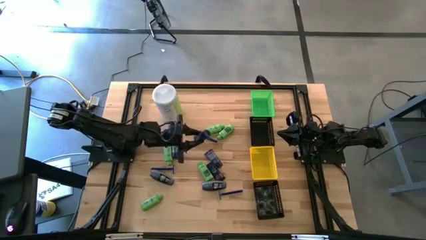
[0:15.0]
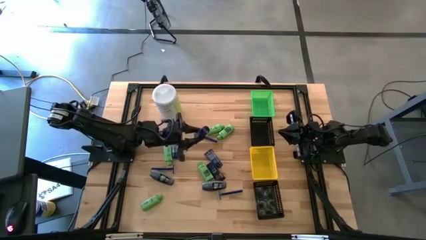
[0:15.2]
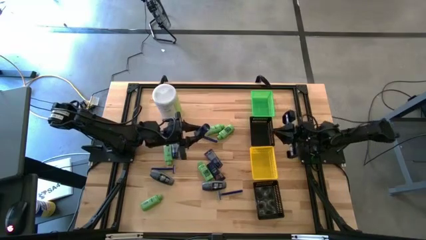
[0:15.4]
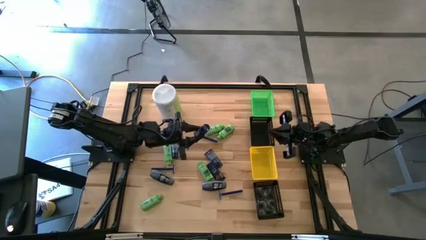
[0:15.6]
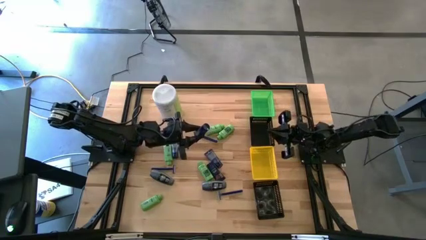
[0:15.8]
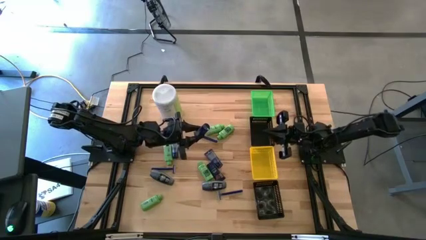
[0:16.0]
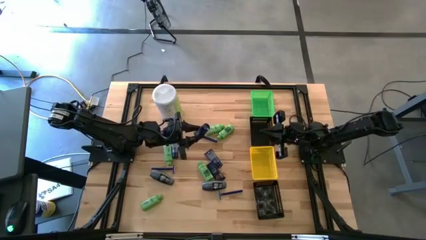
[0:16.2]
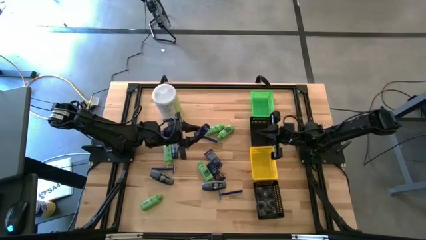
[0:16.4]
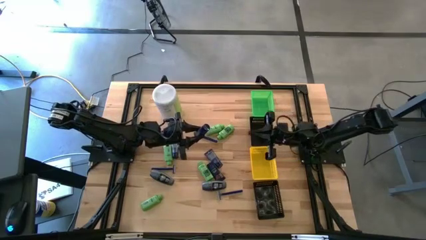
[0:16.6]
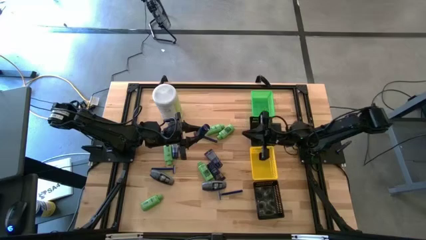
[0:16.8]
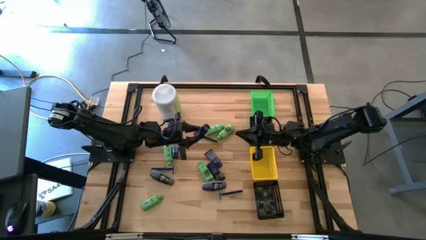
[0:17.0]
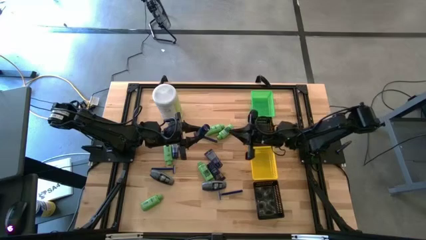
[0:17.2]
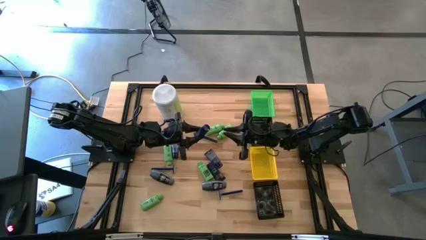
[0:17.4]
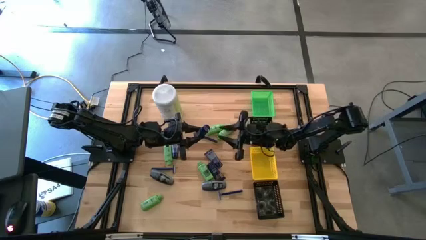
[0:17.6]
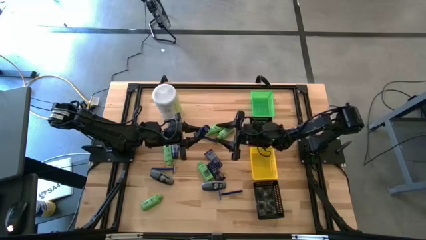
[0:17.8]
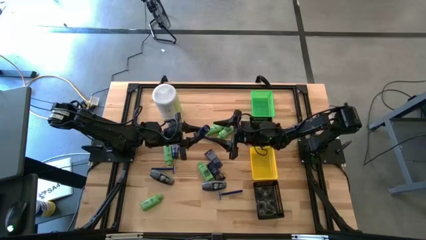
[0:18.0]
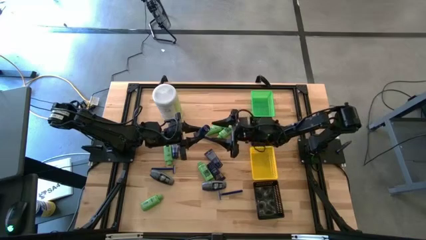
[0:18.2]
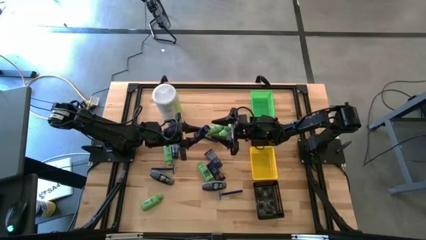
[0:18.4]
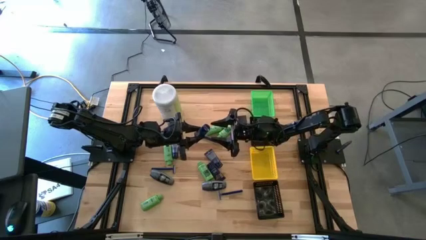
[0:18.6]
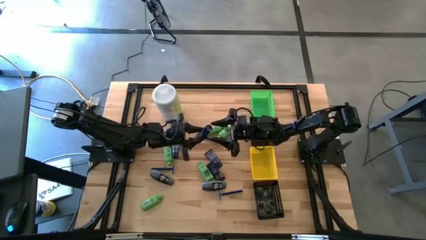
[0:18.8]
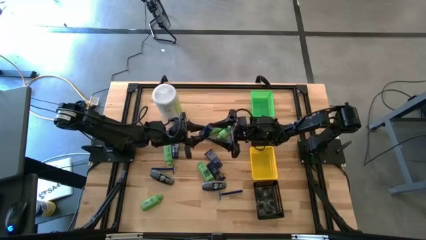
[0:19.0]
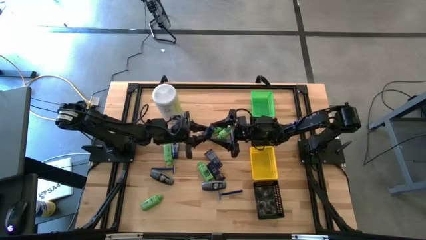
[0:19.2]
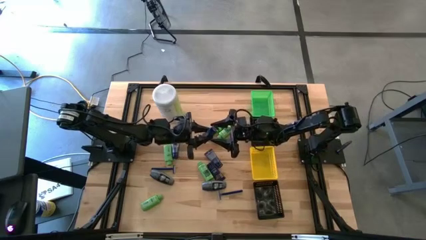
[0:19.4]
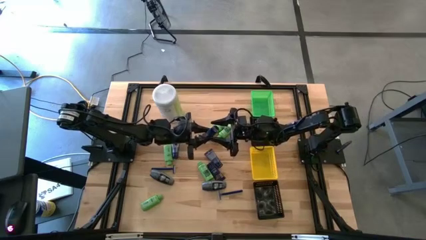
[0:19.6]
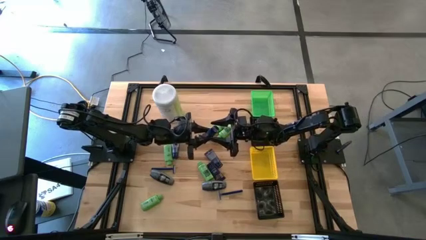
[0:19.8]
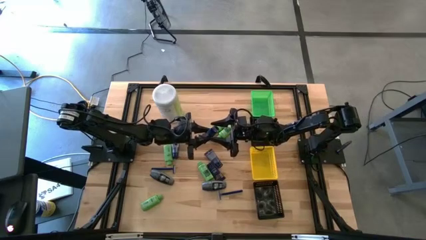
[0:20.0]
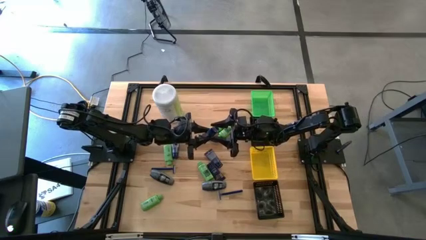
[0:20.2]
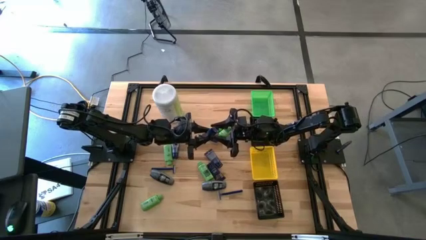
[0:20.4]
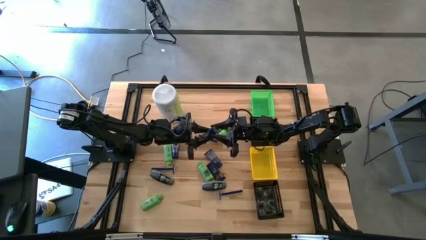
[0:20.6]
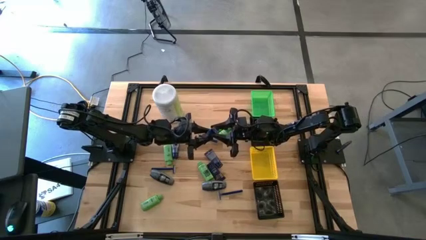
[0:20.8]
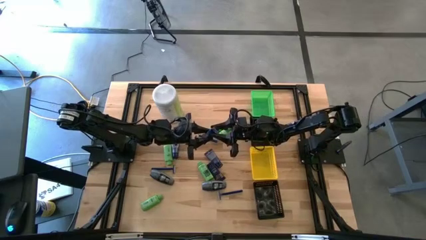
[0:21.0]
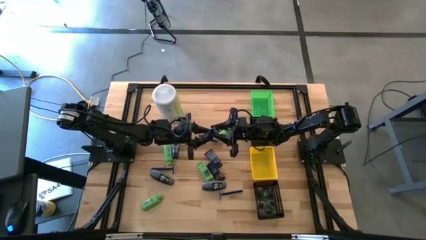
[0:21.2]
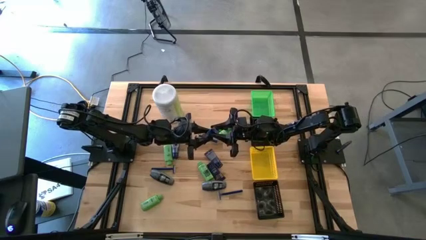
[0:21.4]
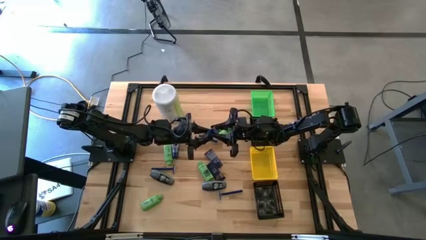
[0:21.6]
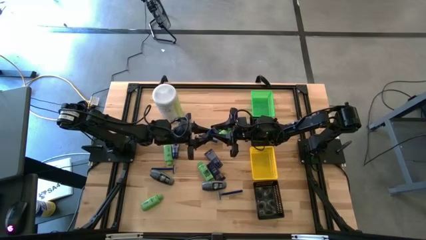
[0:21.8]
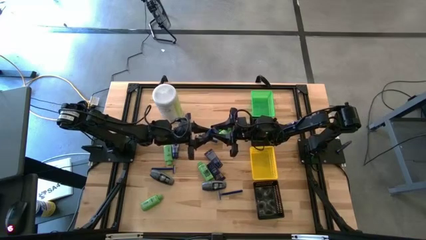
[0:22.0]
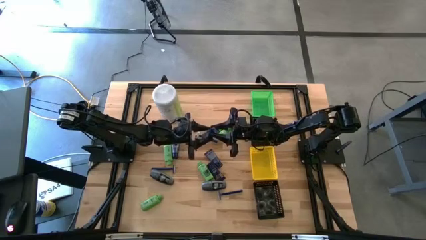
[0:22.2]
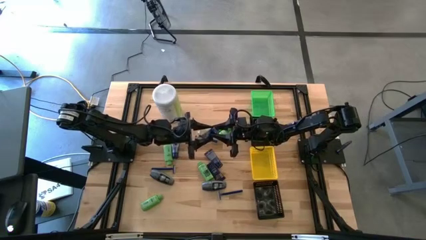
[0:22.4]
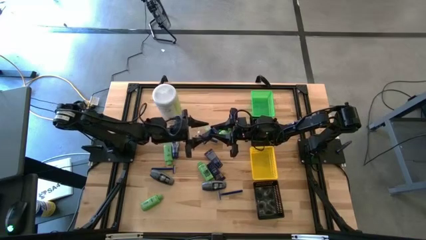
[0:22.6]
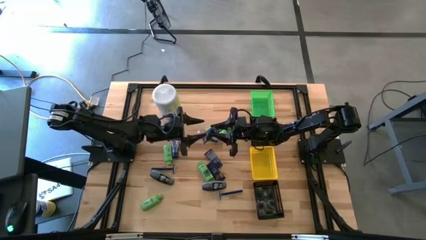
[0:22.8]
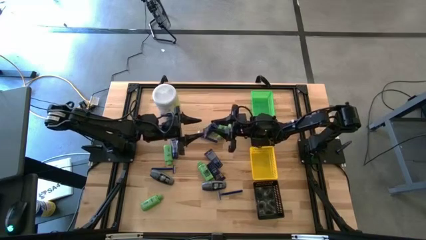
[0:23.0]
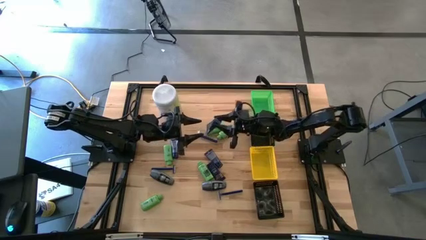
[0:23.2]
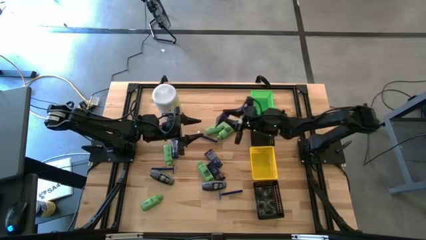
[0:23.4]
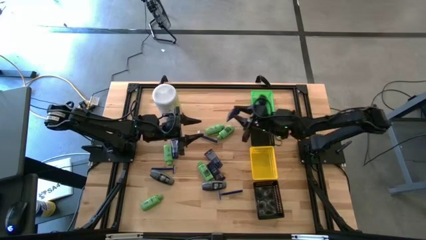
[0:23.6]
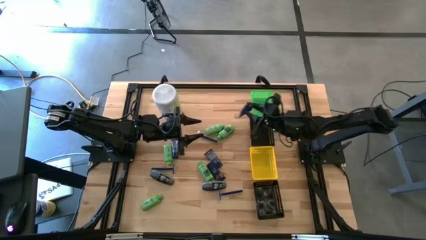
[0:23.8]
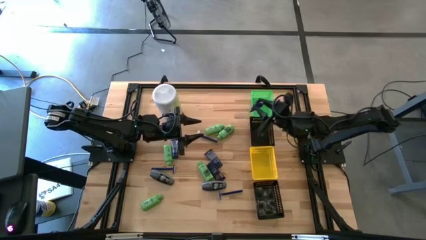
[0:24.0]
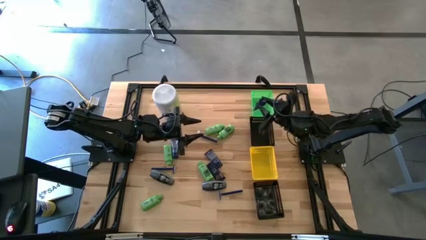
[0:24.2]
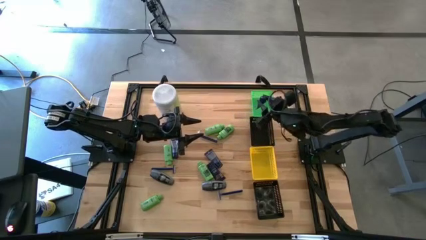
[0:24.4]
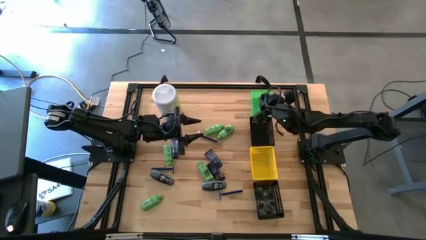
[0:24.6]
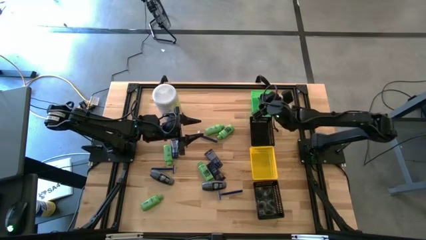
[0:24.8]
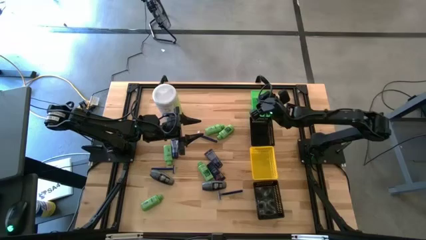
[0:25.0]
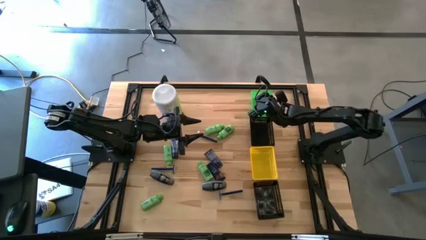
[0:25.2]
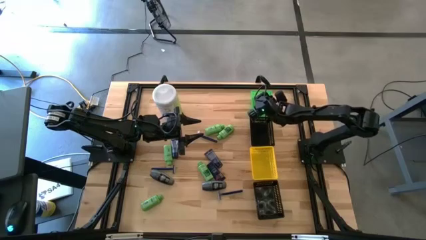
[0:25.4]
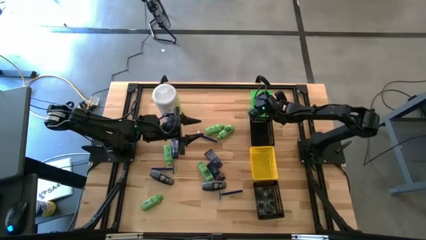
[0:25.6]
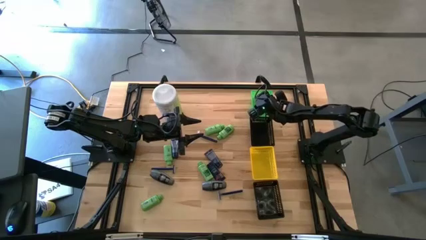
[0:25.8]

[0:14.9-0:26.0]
Task: Pick & Place Travel size toiletries
Put the blue shave cream into the green basket
